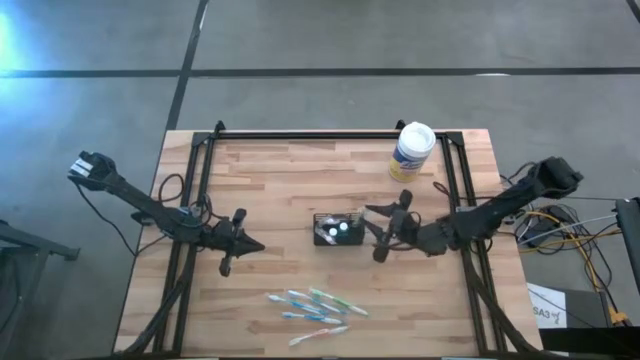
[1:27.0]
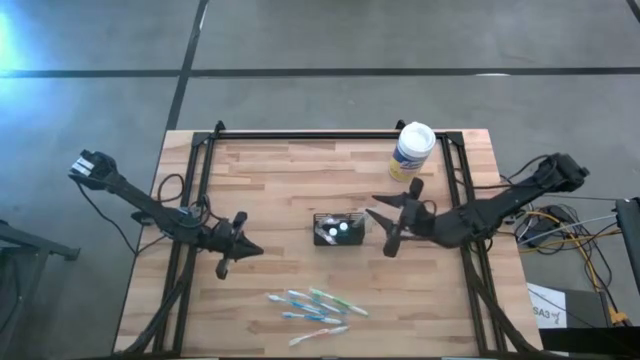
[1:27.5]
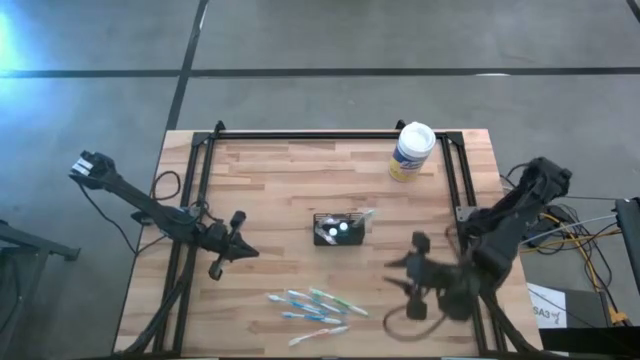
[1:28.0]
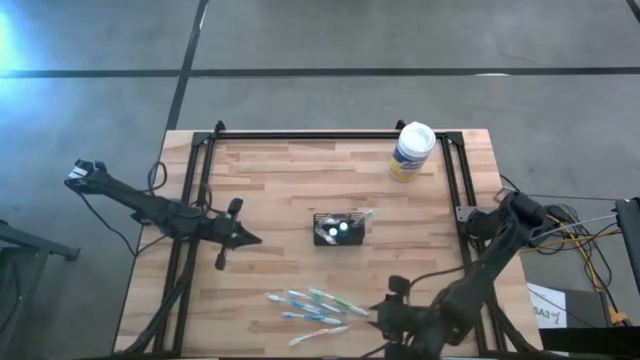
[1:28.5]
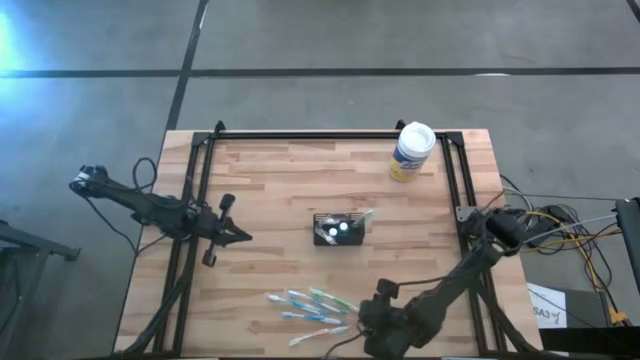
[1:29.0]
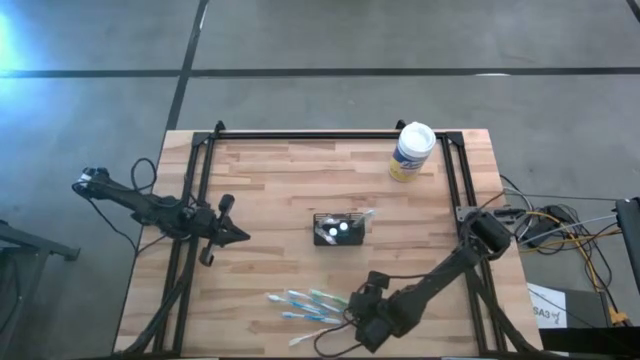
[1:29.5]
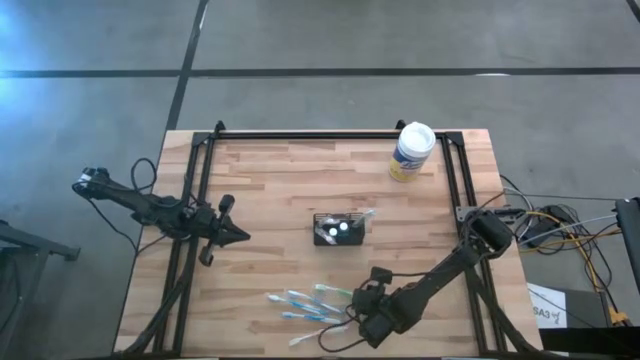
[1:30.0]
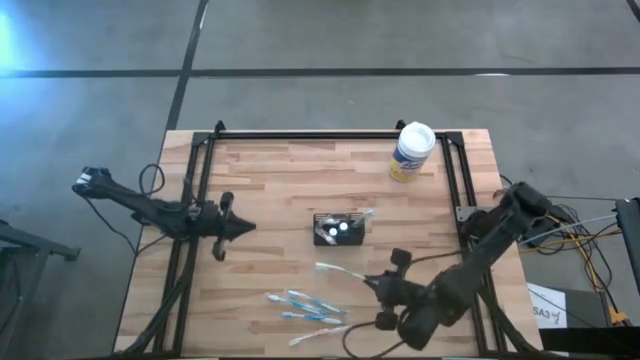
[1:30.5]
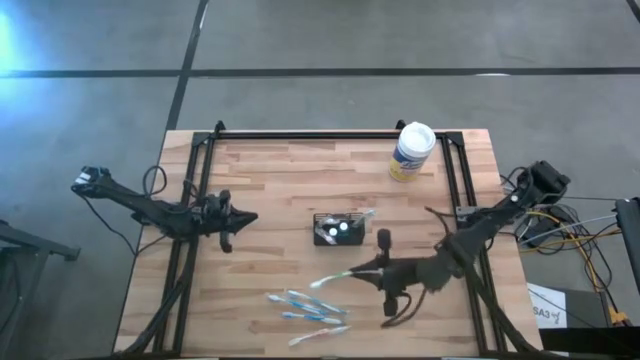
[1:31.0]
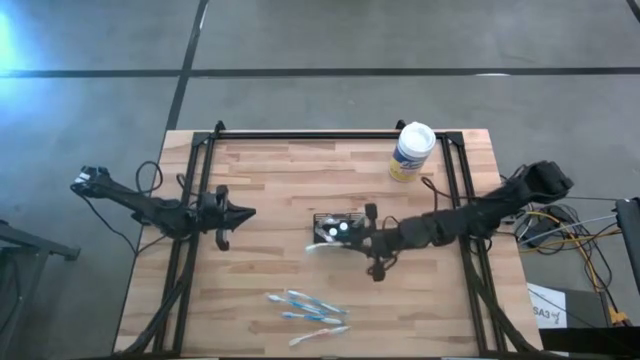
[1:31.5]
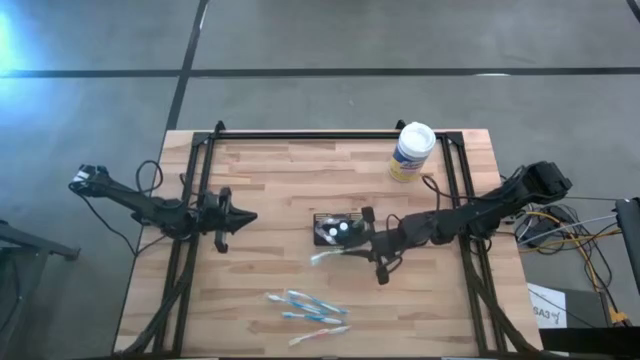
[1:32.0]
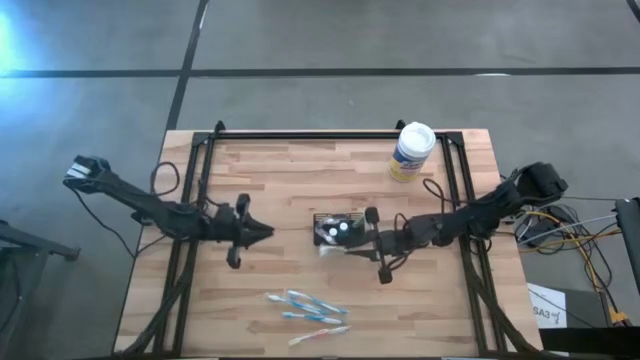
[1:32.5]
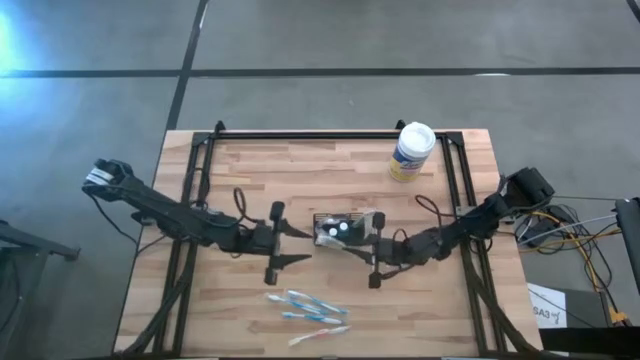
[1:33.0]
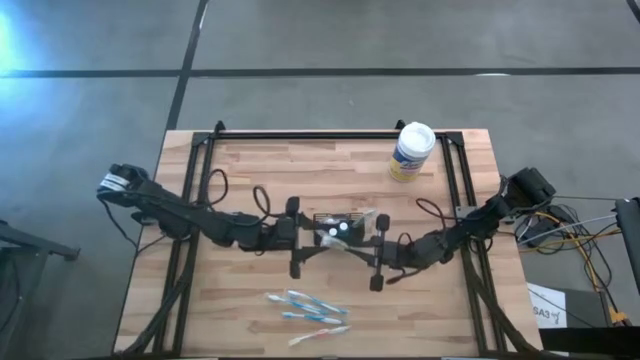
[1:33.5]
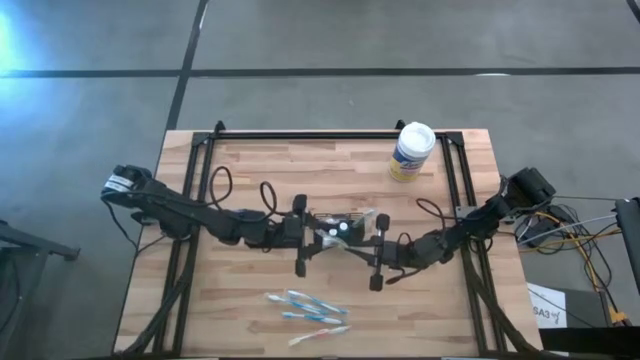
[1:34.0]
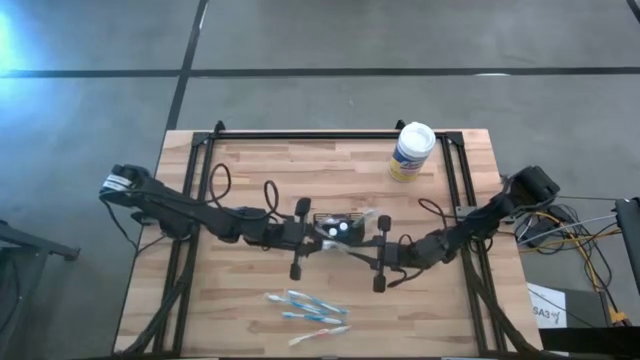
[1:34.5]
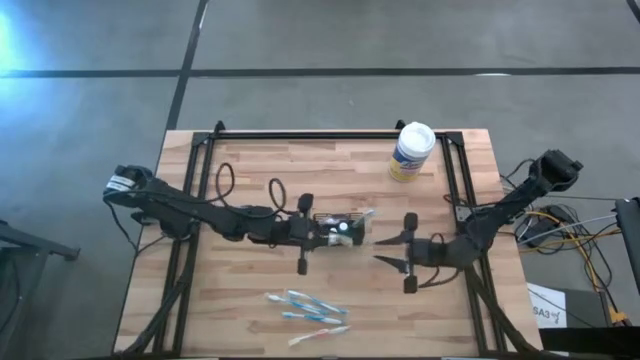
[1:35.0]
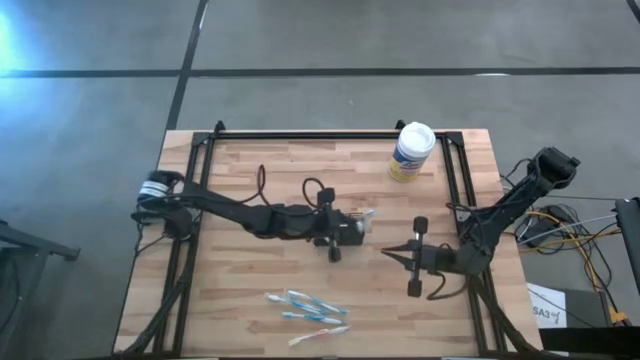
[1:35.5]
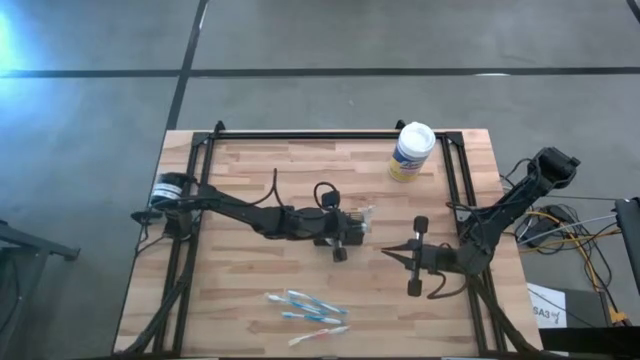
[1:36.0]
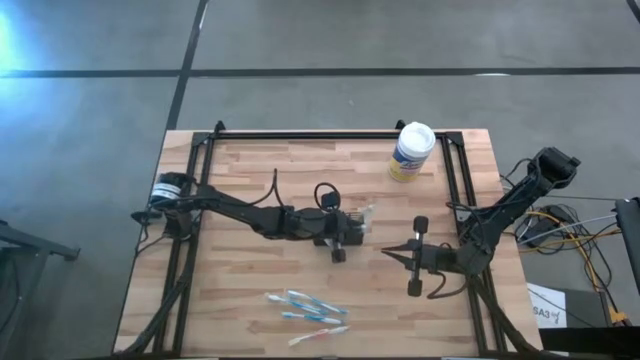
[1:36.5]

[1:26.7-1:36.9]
Task: Pick & Place toothbrushing station
Put the green toothbrush into the mesh organizer

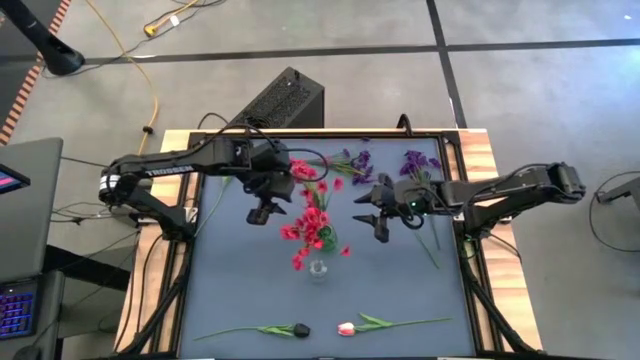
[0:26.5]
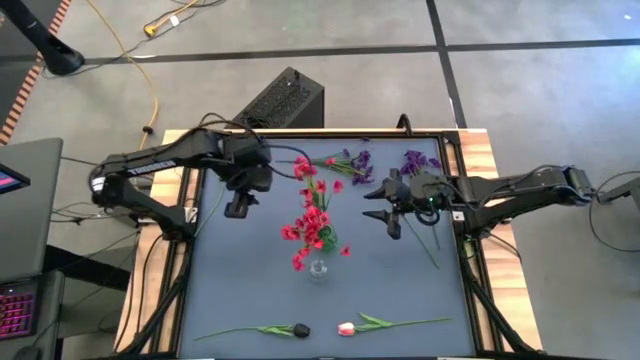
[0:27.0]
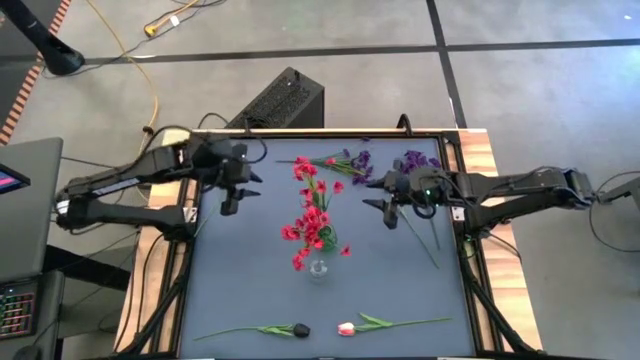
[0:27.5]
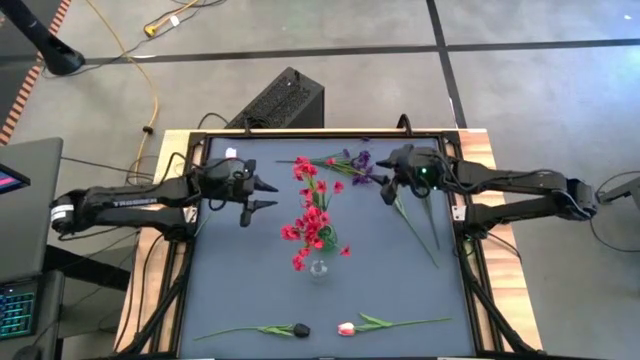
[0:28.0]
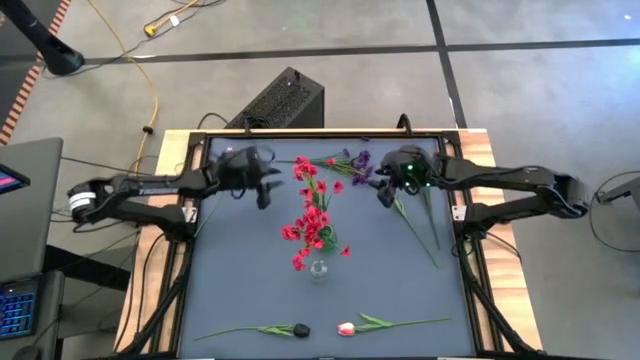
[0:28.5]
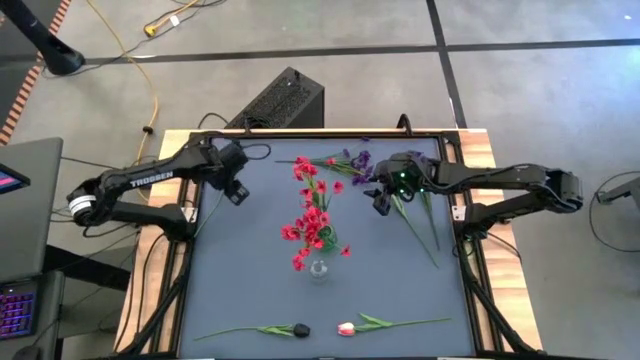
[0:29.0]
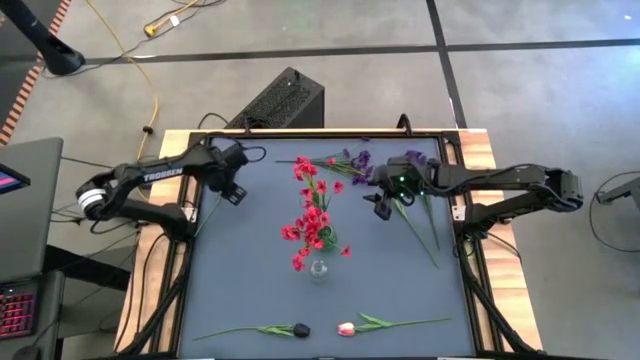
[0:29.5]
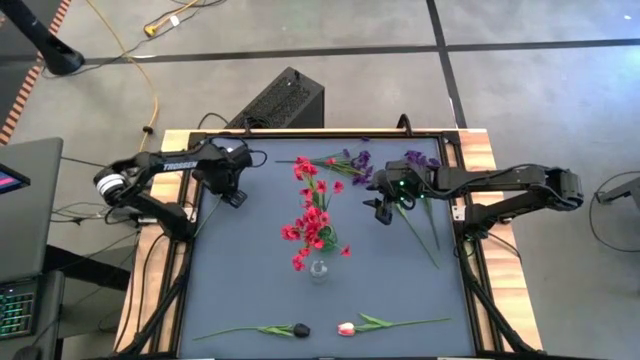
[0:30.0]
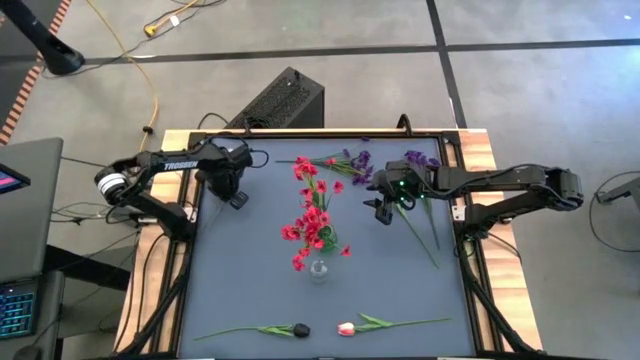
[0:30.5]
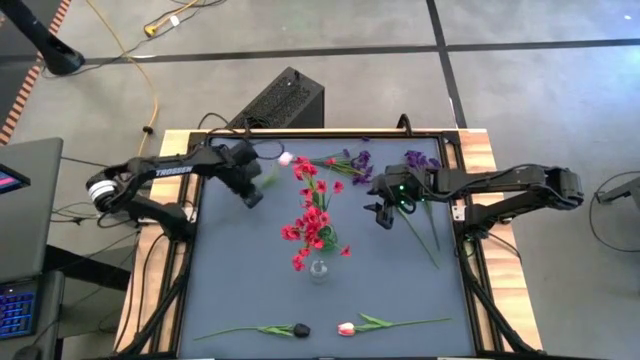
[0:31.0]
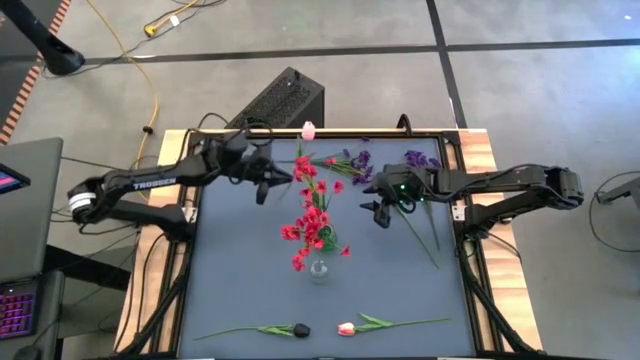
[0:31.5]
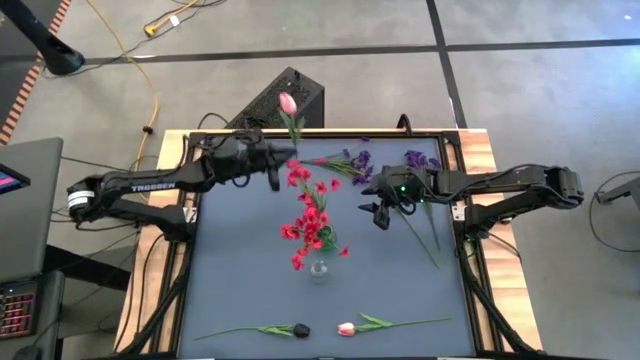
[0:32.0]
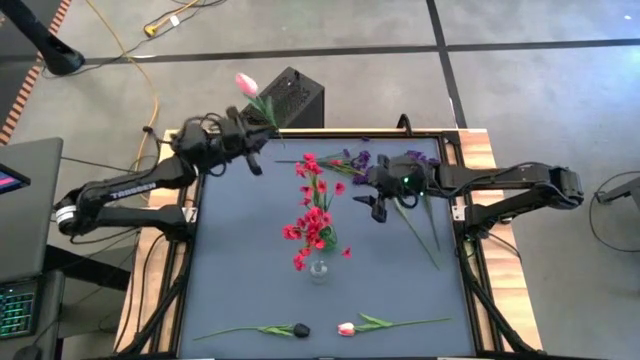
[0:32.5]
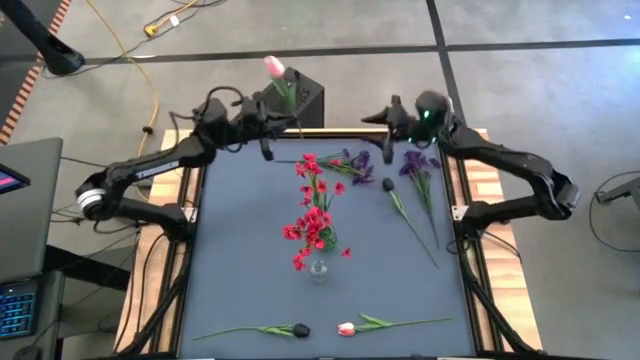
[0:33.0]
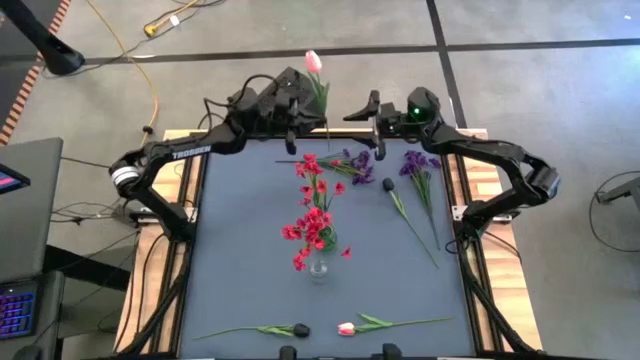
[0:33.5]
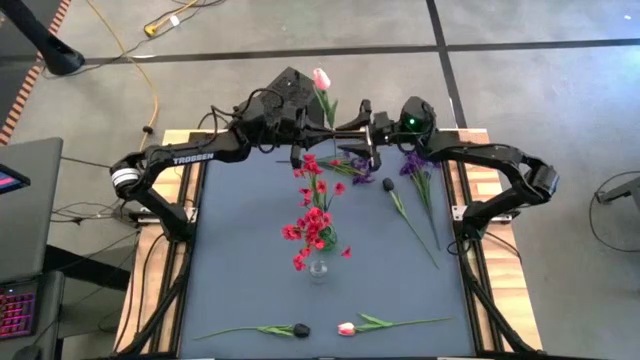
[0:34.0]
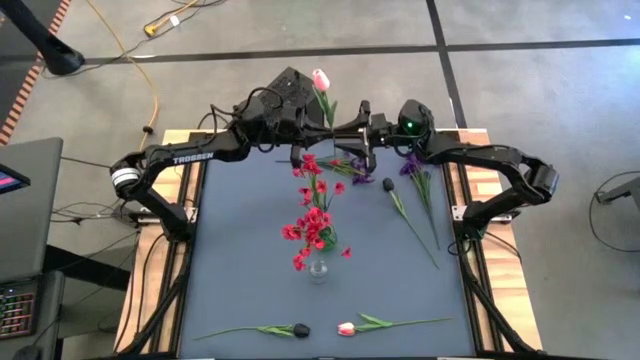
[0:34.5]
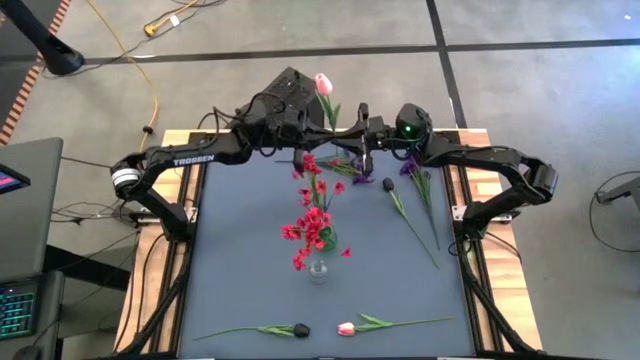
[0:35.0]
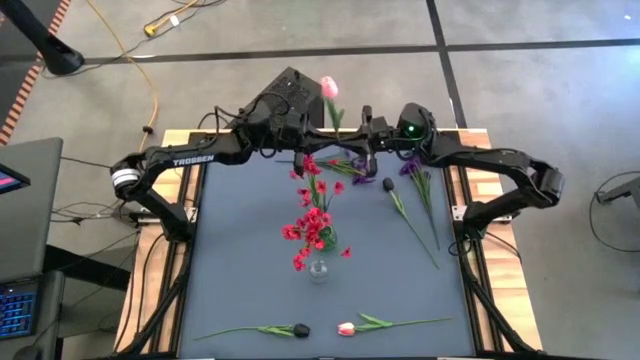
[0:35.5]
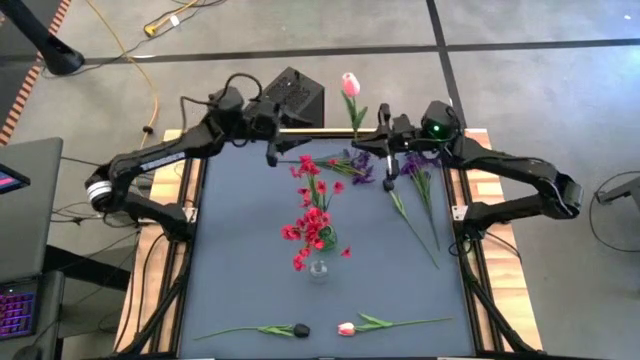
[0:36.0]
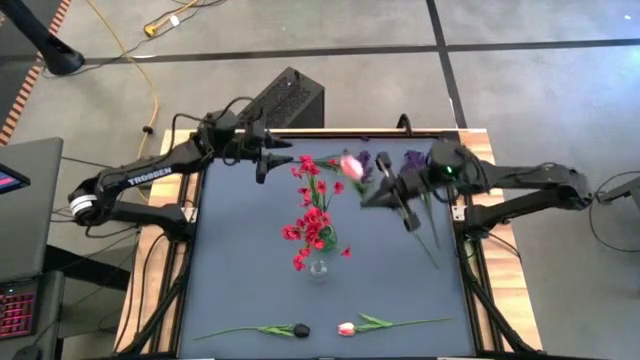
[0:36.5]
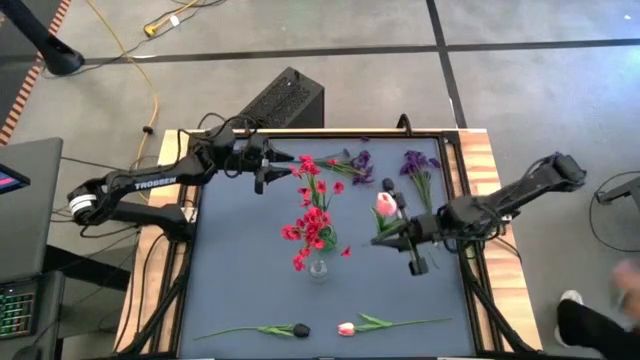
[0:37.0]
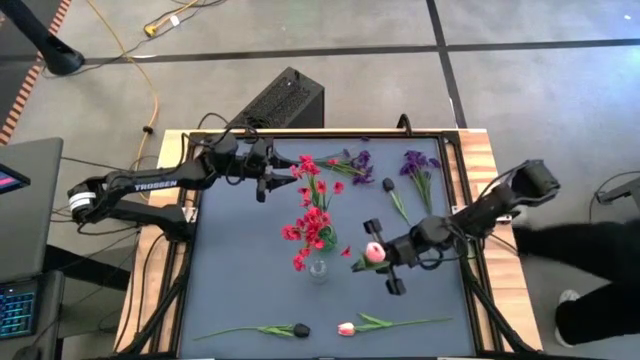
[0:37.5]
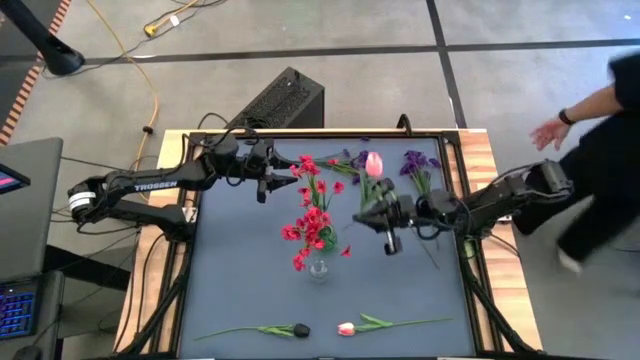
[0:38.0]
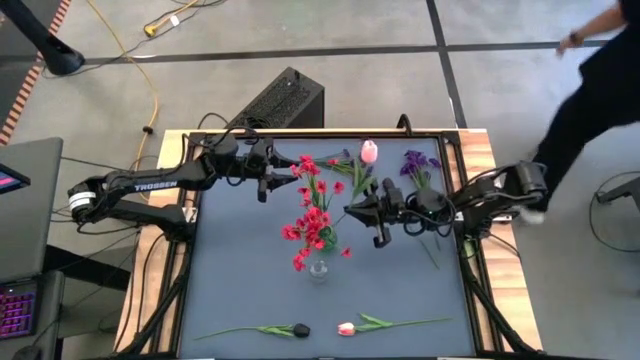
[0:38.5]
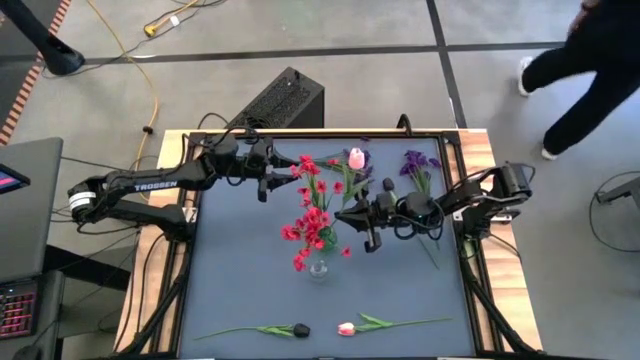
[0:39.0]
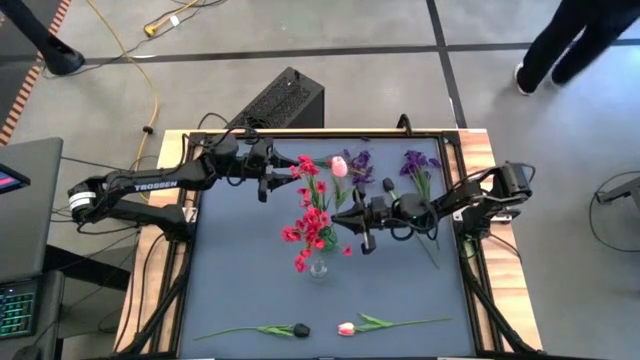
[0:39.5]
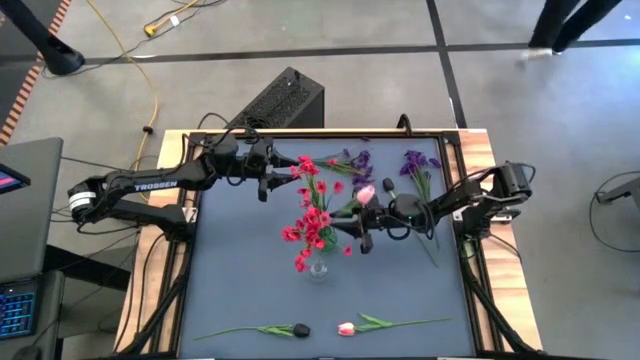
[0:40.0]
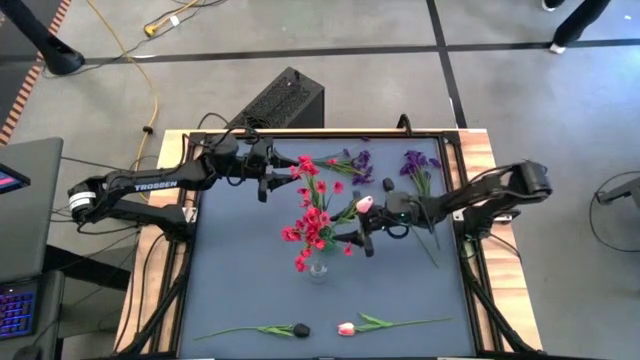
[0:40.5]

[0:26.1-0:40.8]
Task: Sort flowers into vase by color
Put the top pink flower into the green vase
